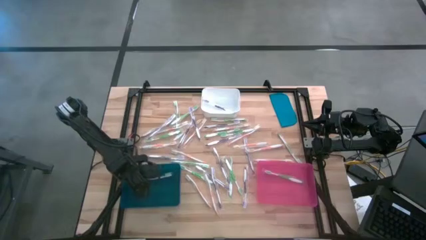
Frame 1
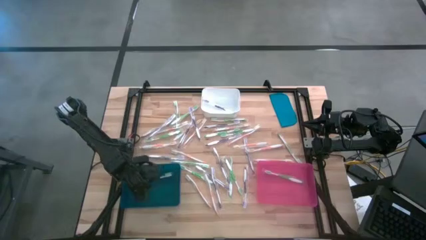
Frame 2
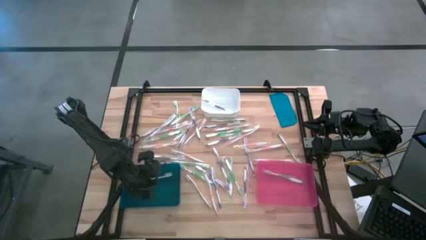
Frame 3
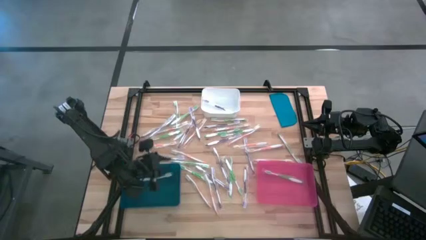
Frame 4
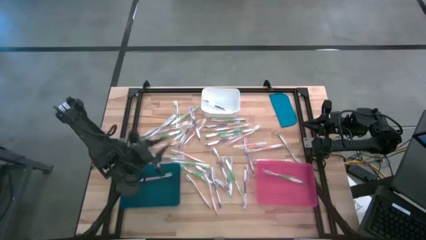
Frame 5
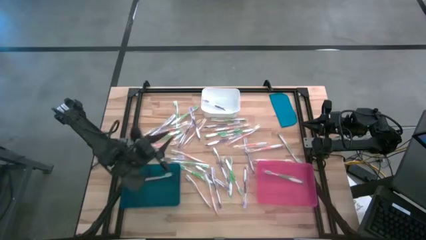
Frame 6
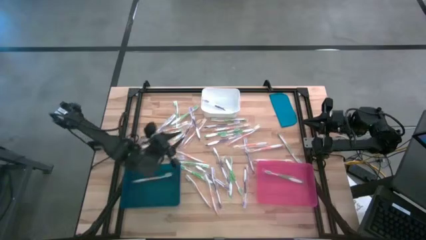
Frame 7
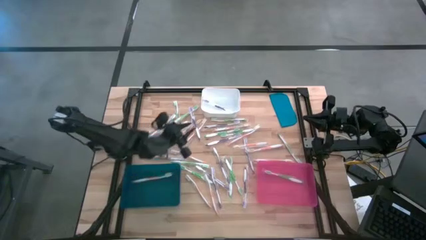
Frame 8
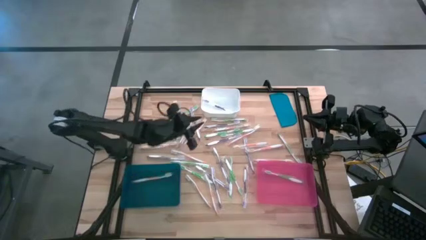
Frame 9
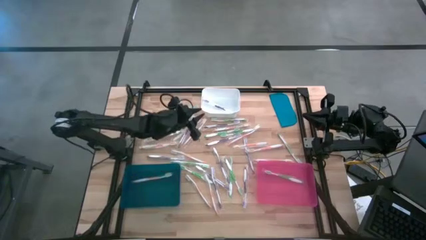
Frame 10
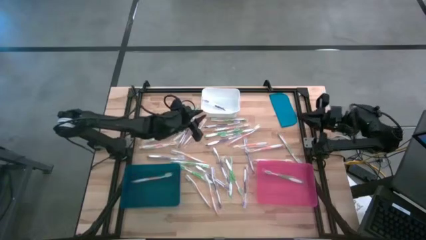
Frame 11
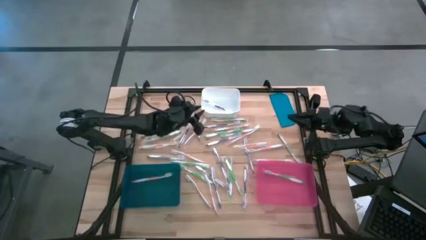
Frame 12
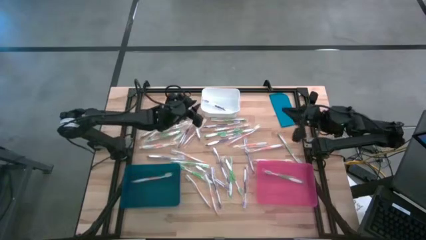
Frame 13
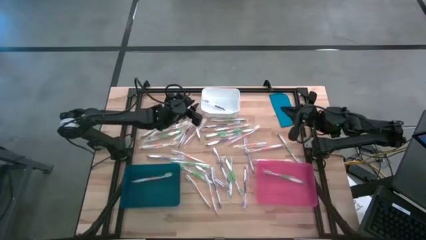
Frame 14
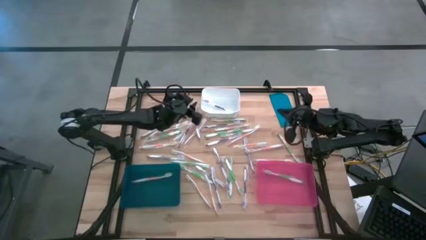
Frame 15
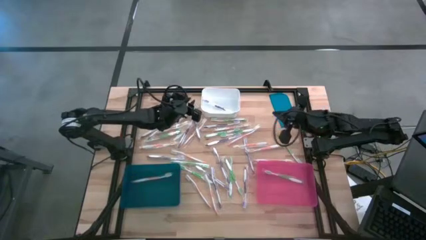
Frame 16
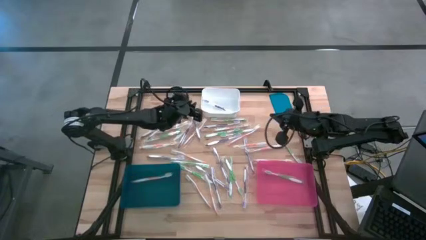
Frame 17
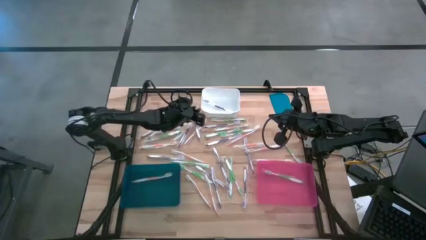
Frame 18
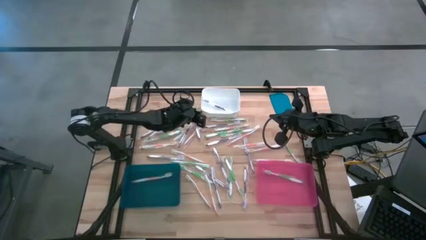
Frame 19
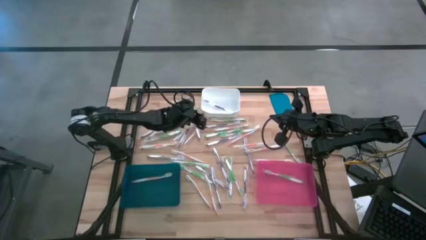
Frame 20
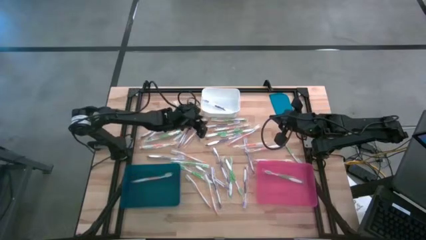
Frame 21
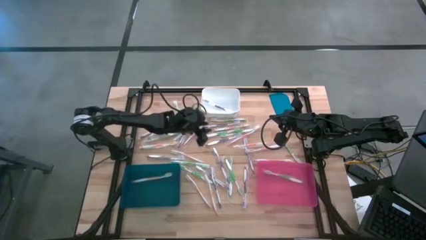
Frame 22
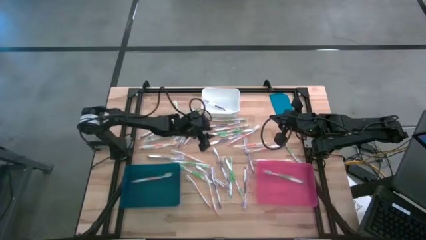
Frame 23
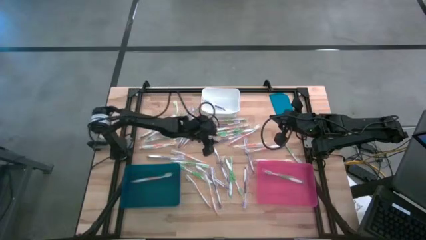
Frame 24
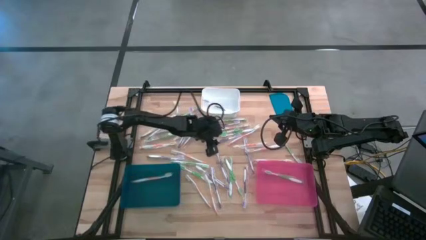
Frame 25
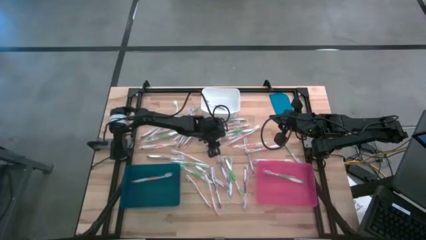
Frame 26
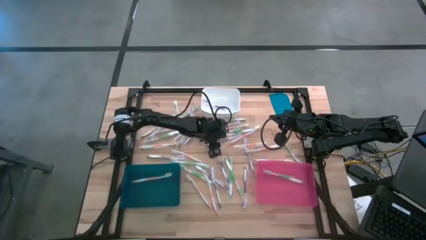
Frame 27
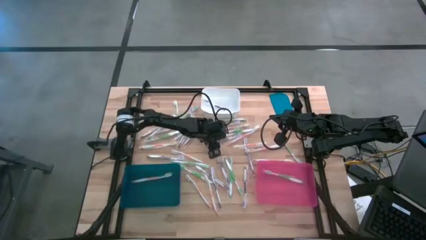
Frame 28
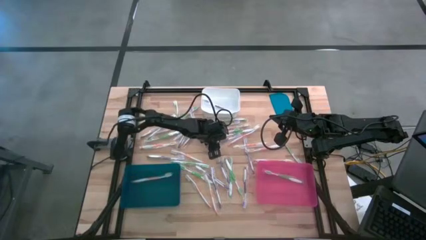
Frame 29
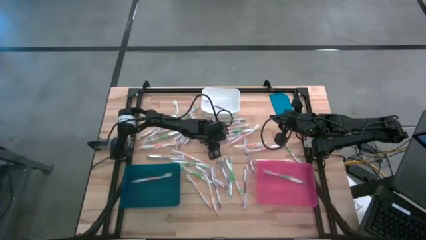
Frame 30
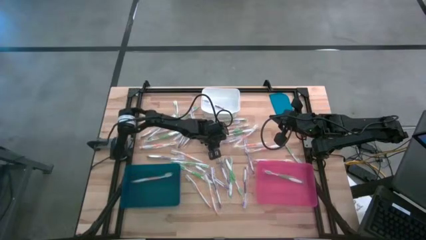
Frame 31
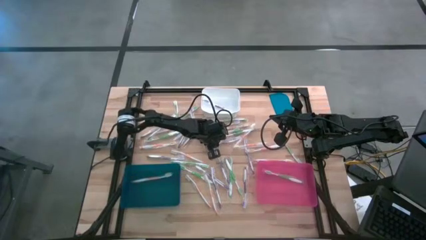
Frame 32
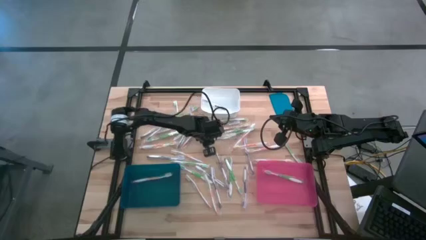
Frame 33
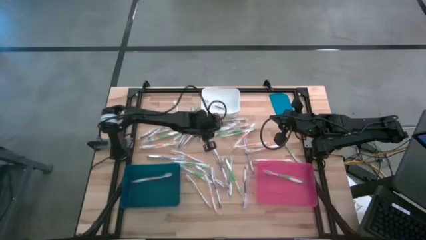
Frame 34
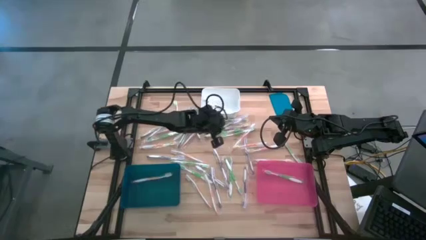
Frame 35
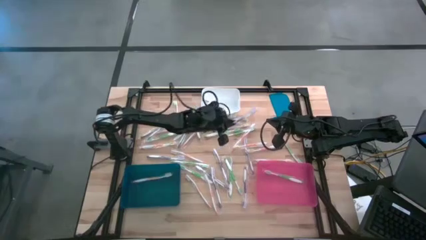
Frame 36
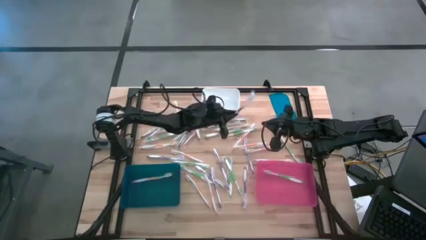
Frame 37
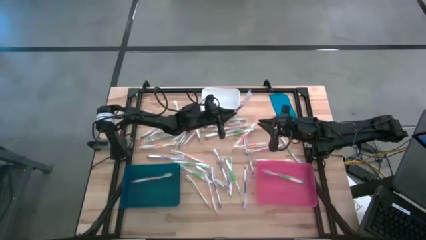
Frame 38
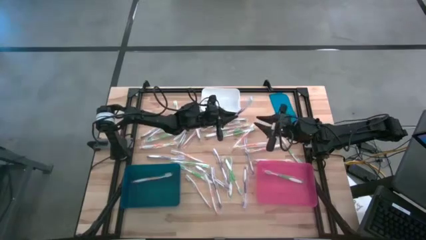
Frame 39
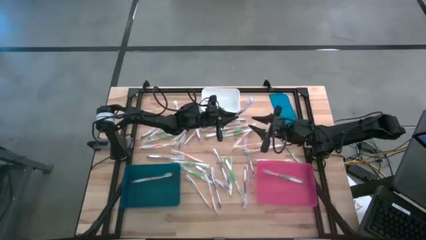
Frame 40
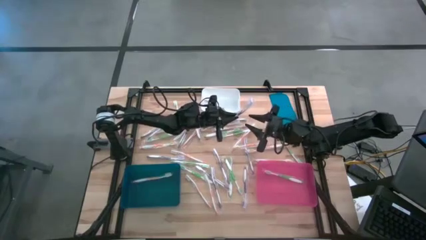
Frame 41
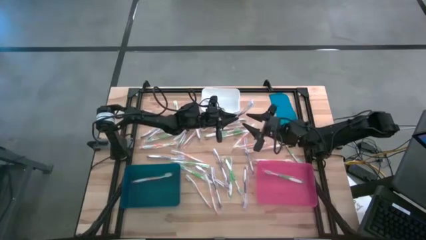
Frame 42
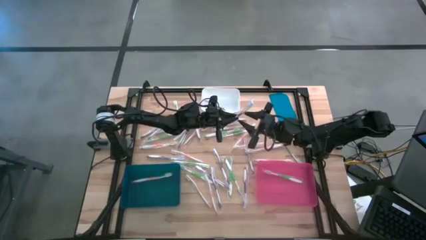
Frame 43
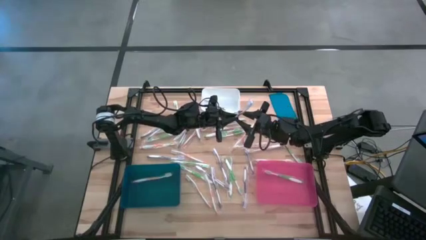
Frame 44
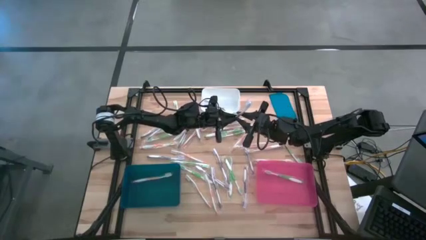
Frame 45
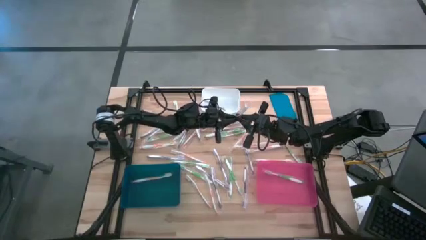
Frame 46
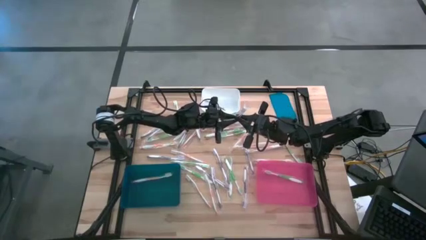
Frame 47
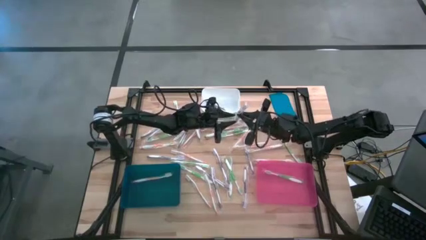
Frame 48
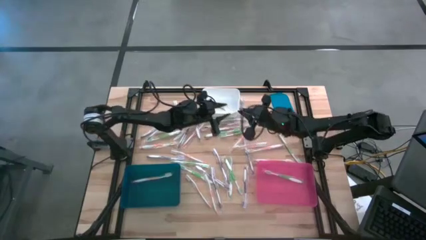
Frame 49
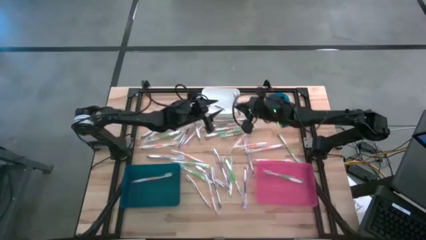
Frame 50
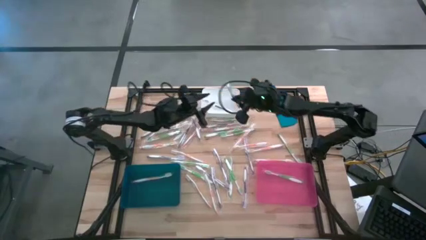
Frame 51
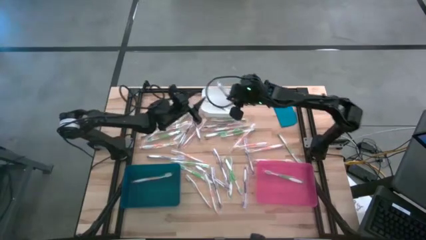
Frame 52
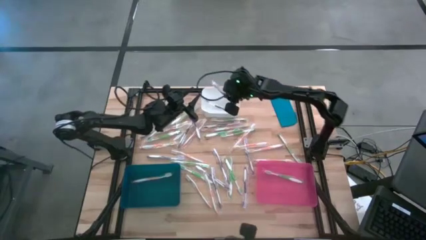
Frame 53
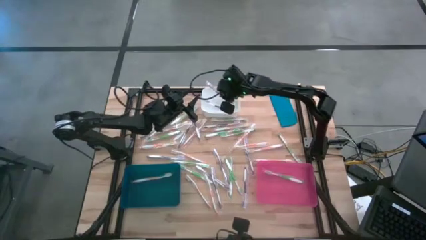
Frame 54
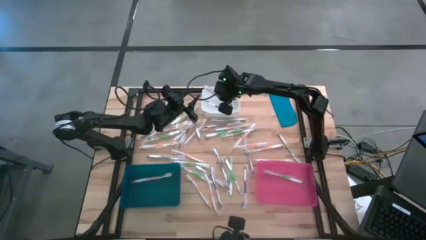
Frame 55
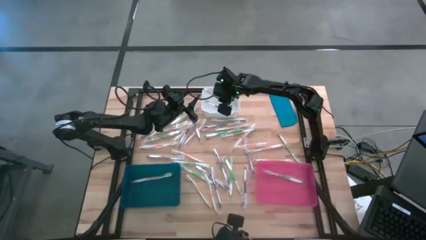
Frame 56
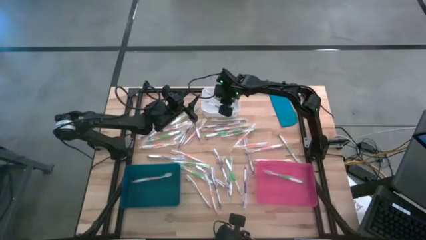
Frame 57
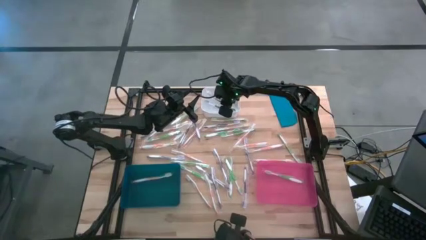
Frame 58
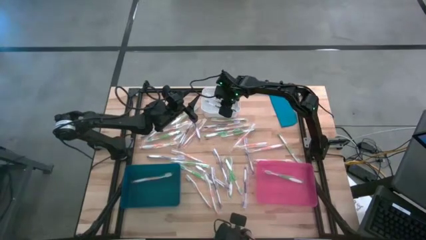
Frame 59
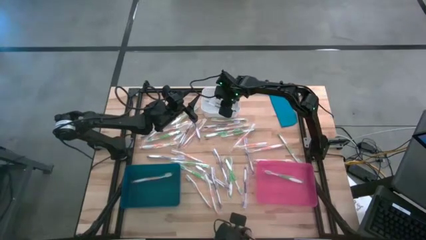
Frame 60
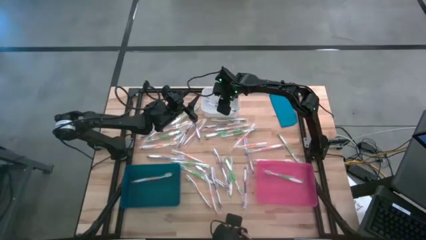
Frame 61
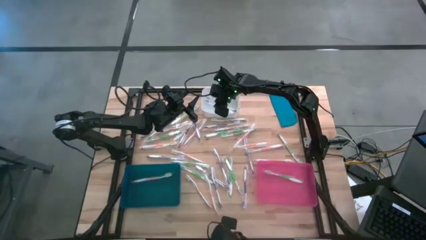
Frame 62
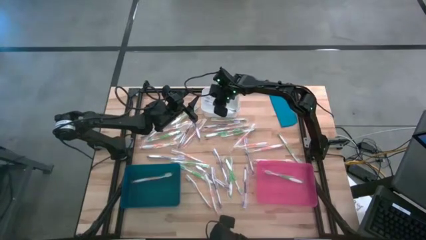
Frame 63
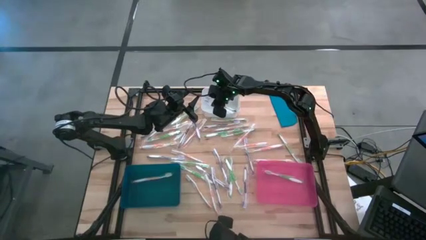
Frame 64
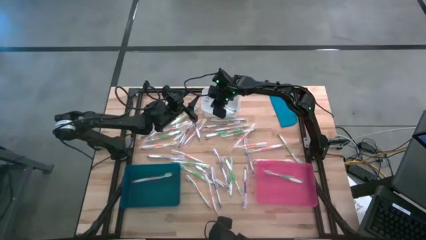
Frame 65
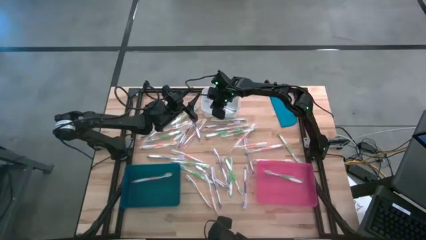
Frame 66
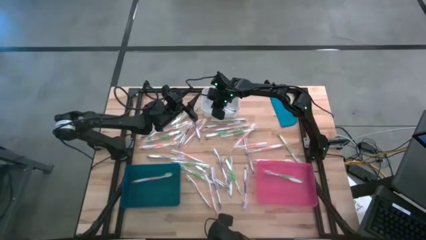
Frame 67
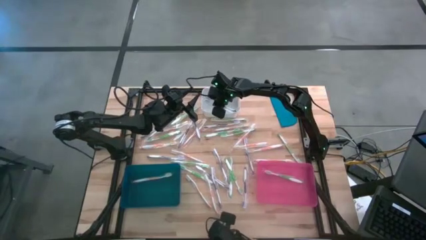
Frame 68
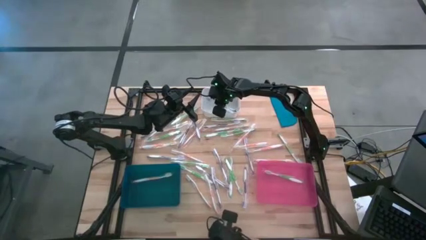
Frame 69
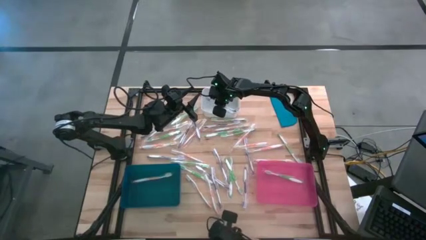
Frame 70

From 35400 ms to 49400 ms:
Task: Pick & Place Toothbrushes
Put the violet toothbrush into the white bin
